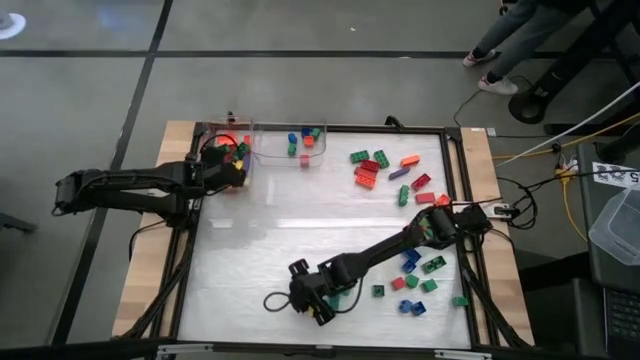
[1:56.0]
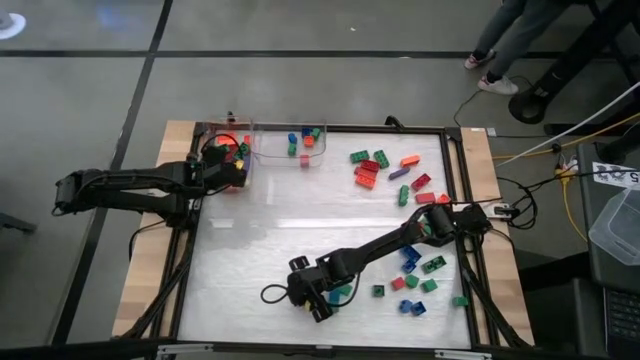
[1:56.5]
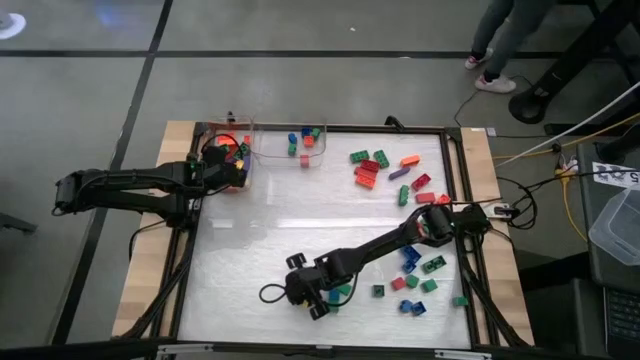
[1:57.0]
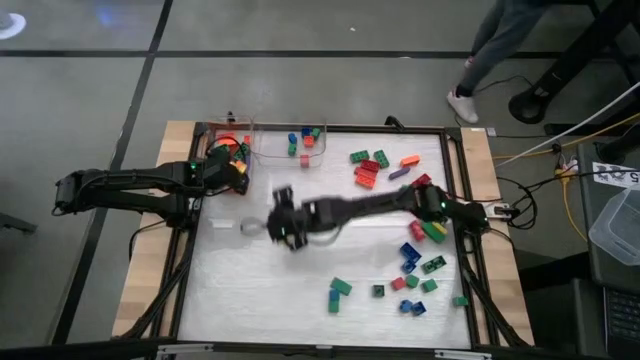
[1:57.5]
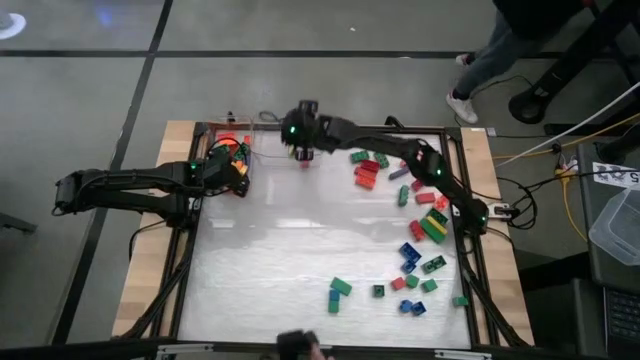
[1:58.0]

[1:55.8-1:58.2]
Task: Sort blocks by size
Put the small blue game piece into the right transparent bin

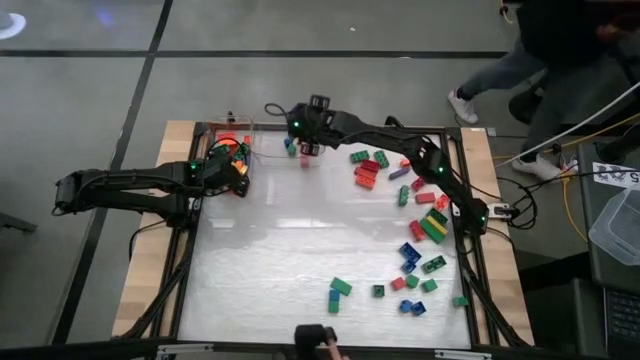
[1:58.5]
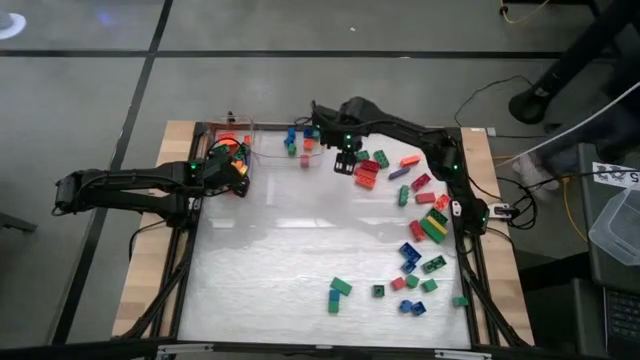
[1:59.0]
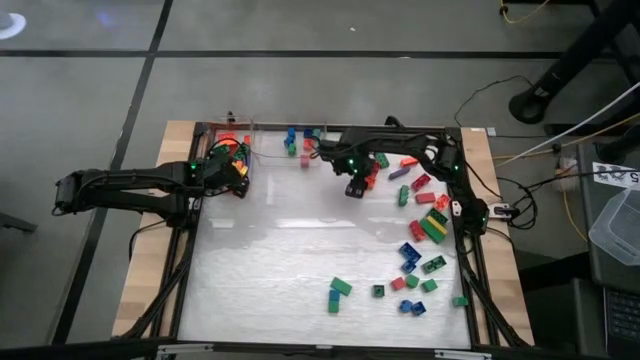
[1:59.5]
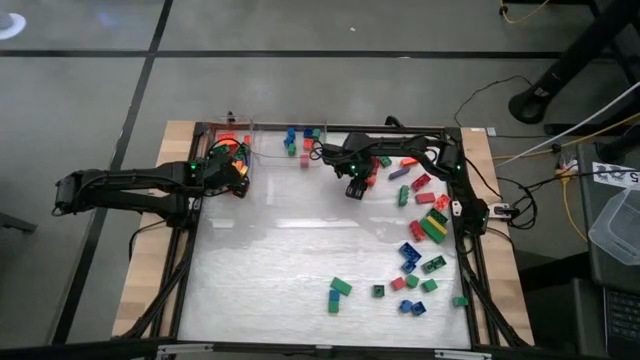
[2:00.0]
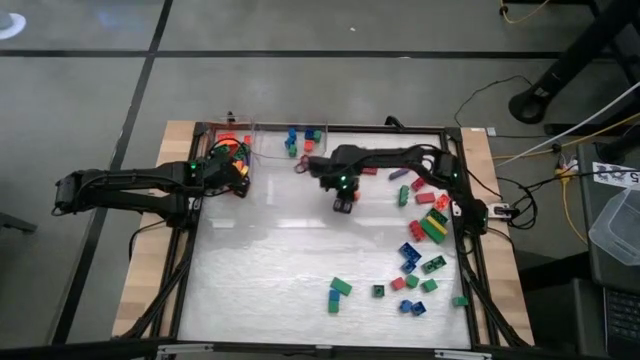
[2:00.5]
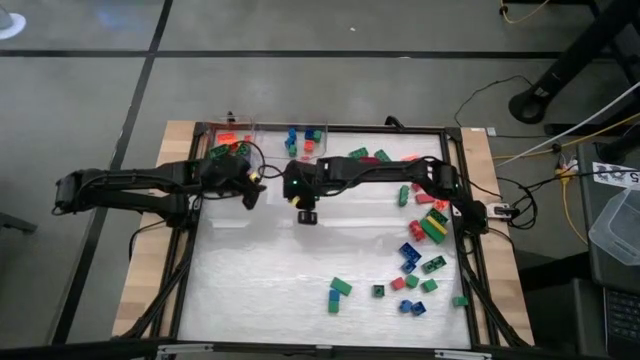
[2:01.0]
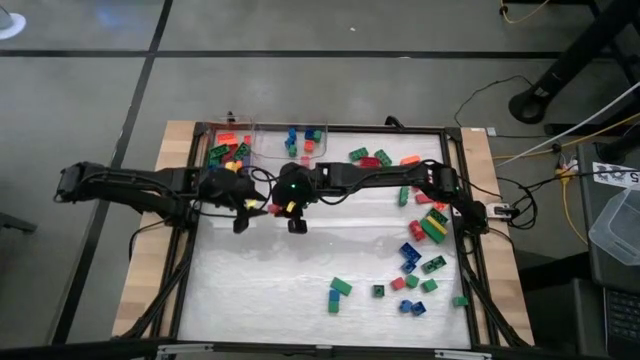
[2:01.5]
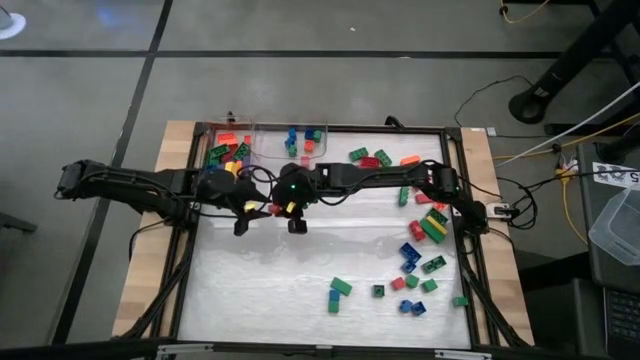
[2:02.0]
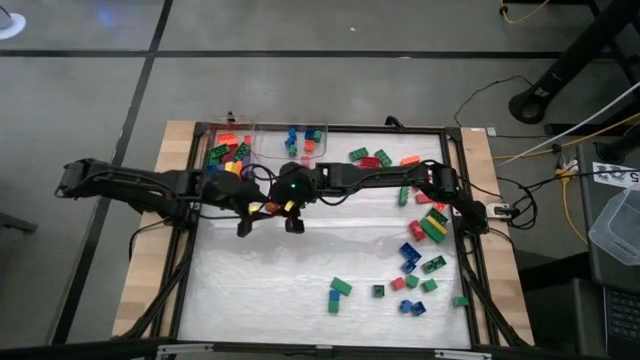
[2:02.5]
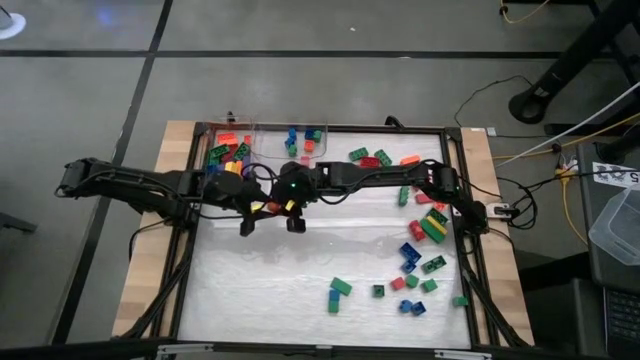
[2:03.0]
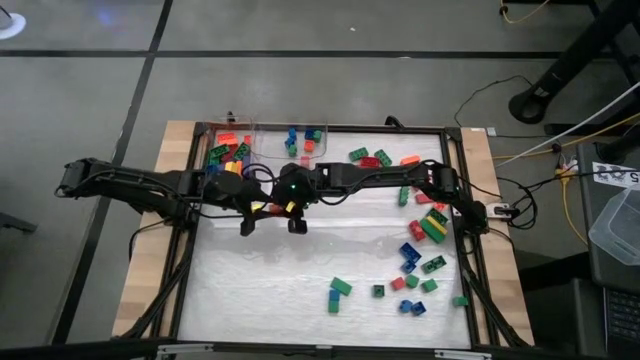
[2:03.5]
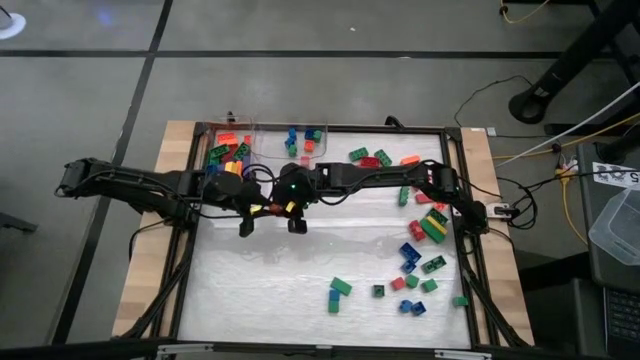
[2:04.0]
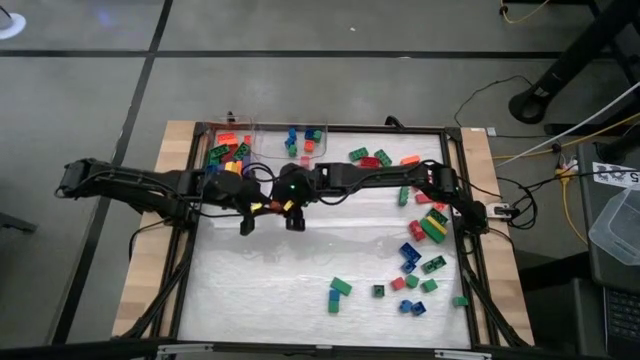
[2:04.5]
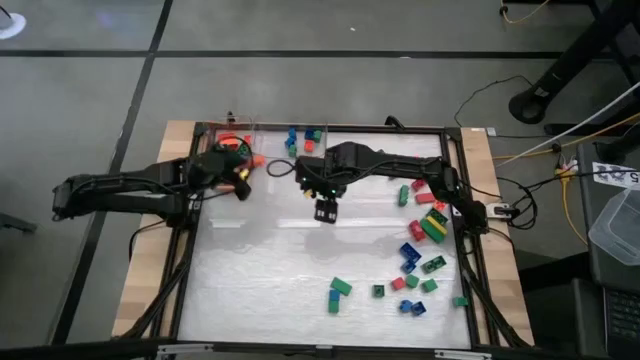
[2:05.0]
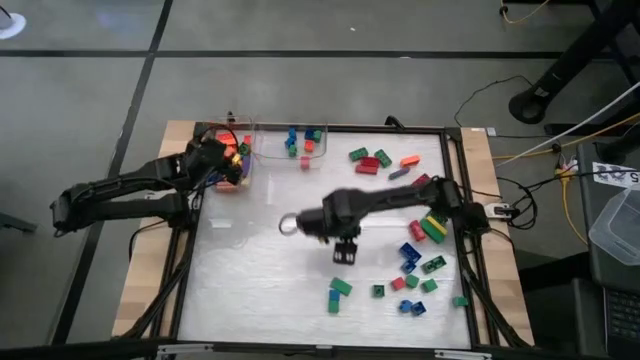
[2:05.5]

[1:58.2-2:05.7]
Put the large orange game piece into the left transparent bin

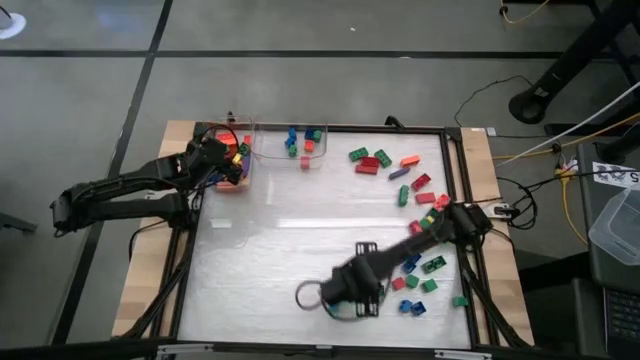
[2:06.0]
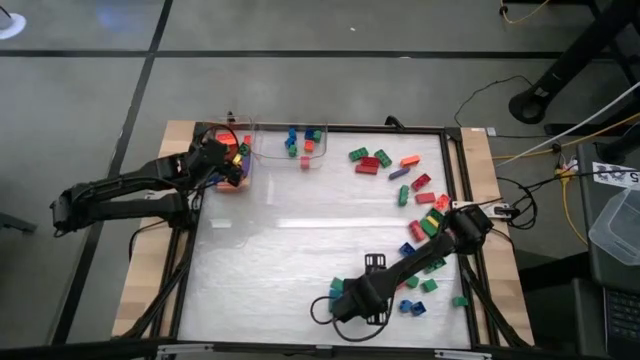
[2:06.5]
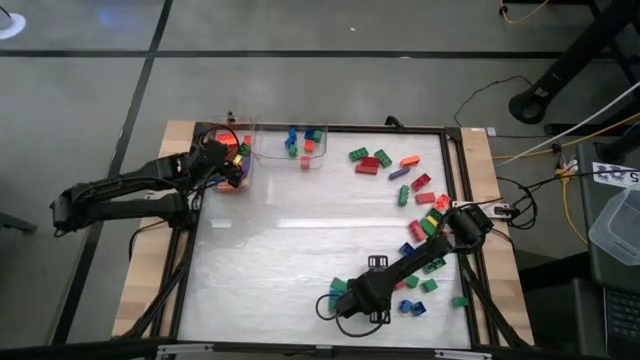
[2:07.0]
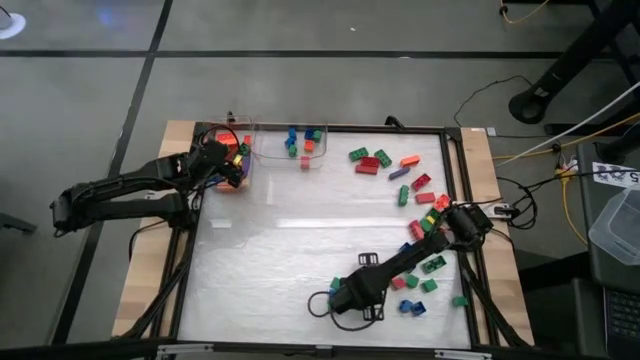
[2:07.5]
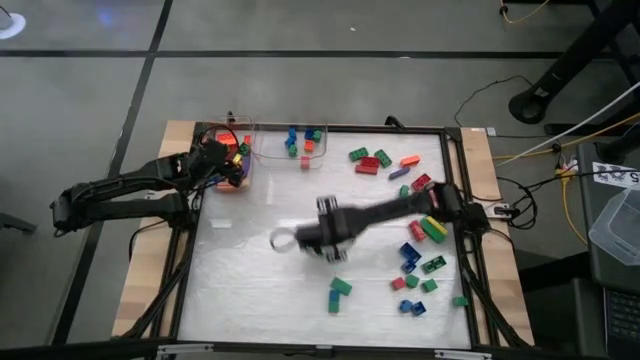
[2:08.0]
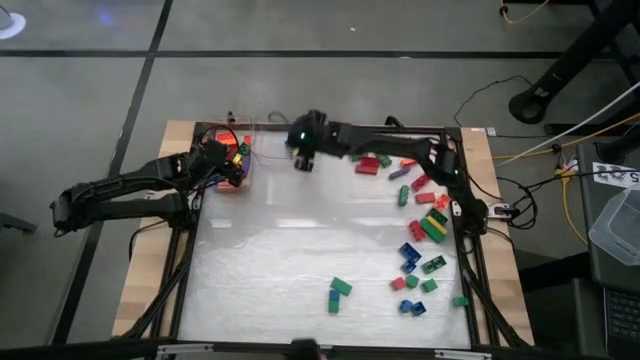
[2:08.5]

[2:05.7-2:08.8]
Put the small green game piece into the right transparent bin

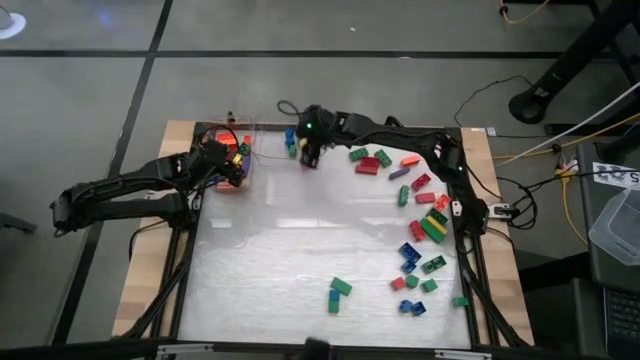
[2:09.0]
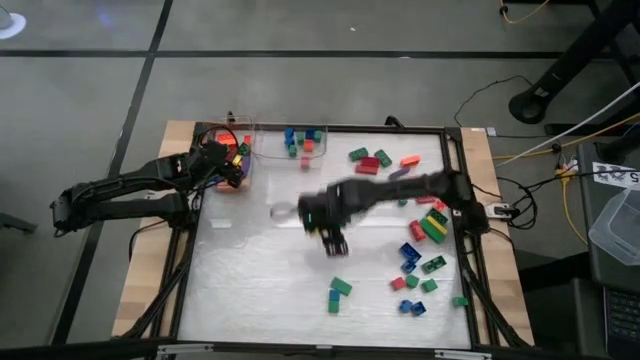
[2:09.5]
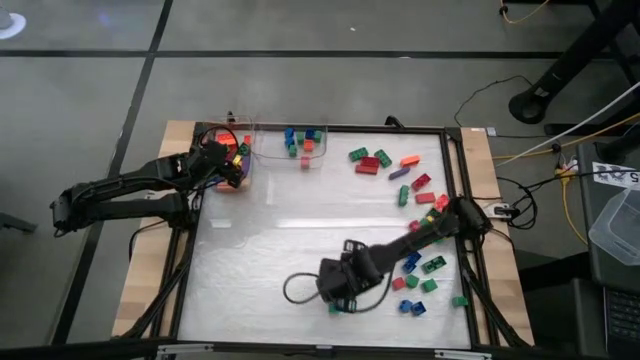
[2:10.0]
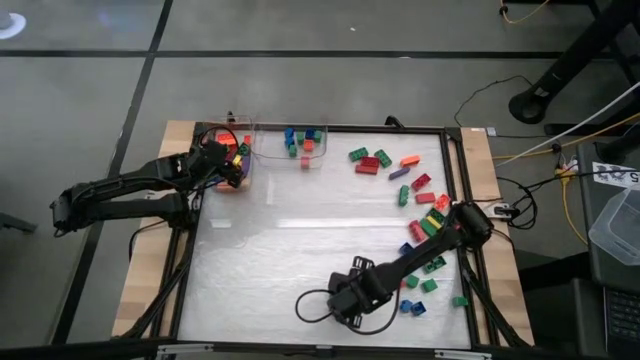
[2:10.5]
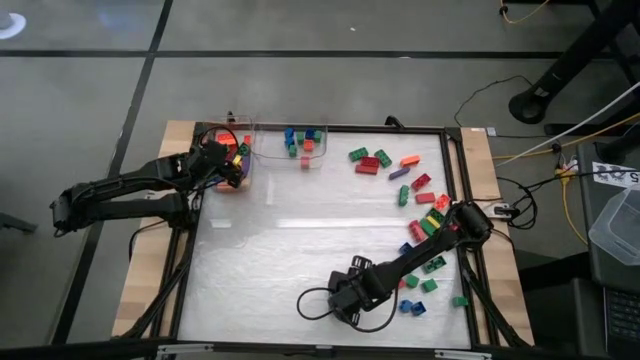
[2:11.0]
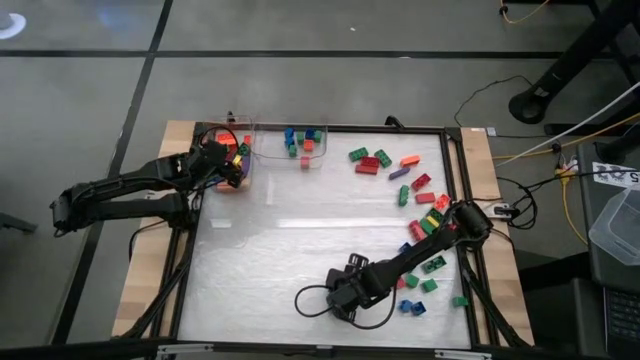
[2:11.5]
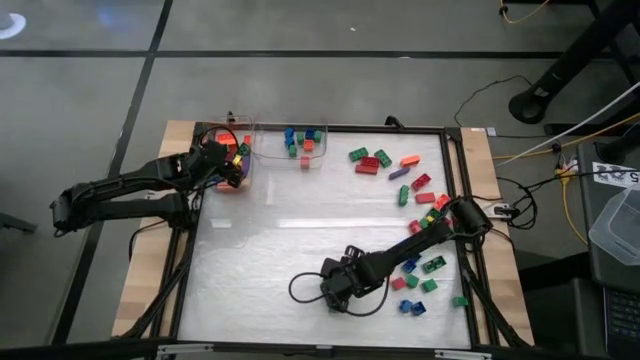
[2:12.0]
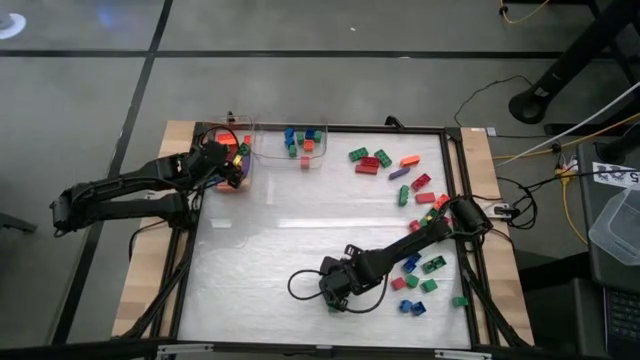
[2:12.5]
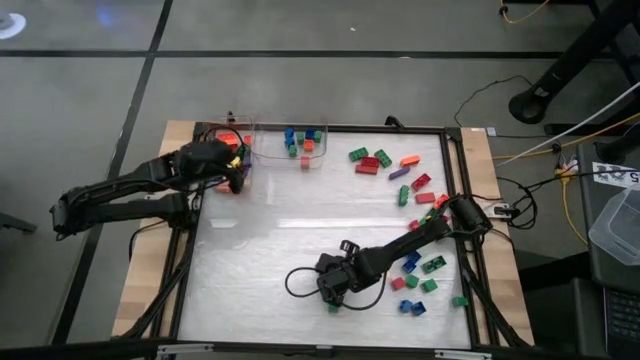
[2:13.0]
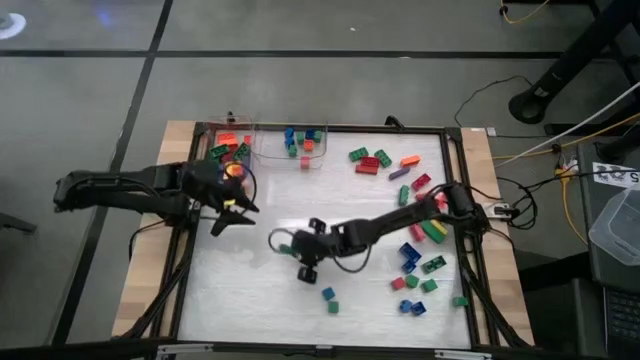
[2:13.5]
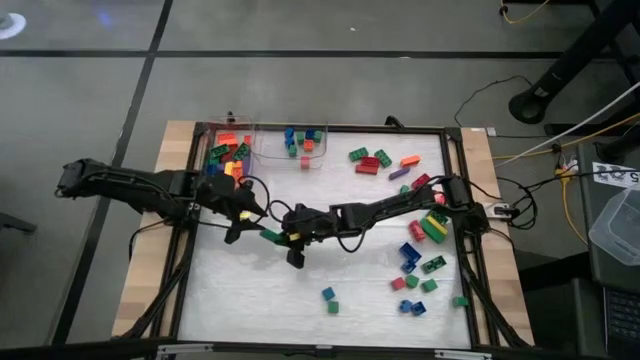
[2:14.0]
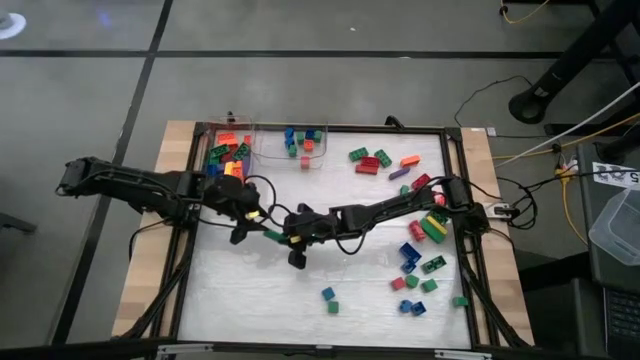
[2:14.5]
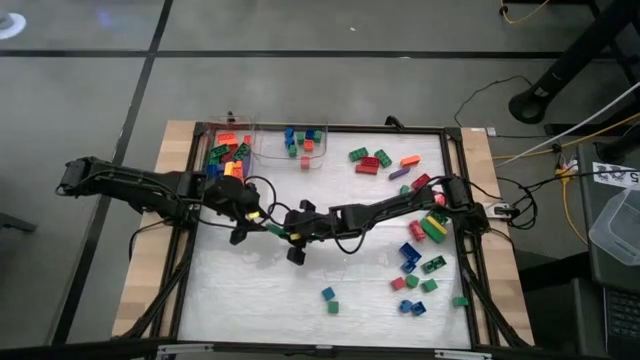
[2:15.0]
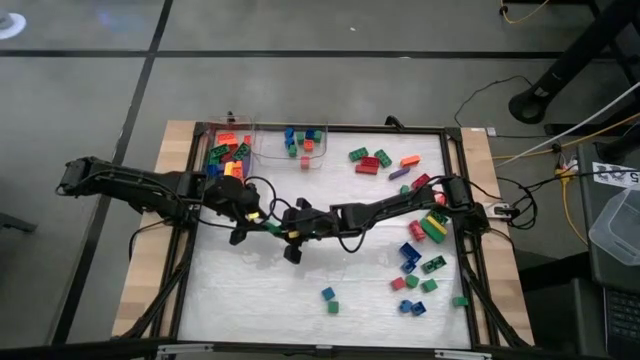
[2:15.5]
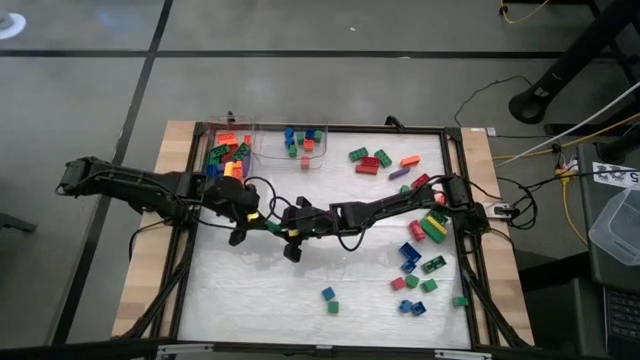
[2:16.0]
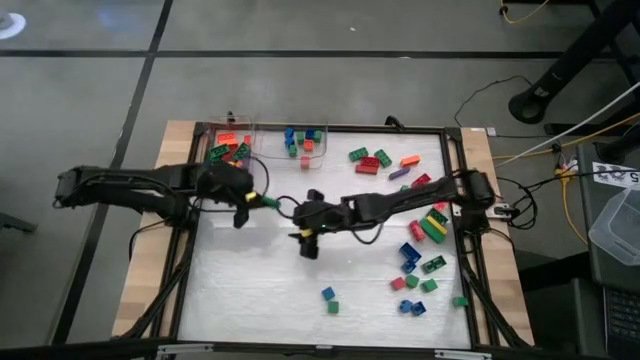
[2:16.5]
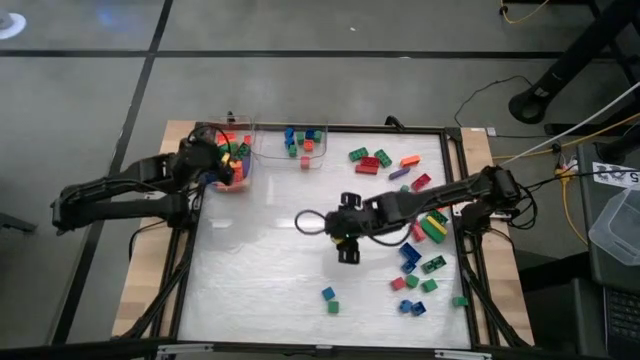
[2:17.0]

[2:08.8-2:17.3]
Put the large green block into the left transparent bin
